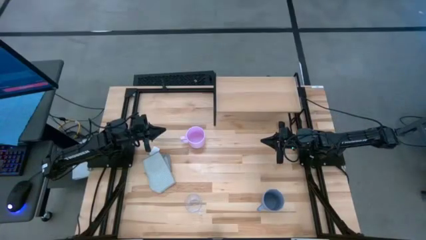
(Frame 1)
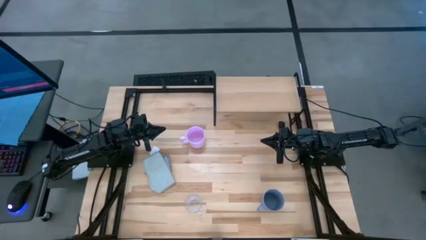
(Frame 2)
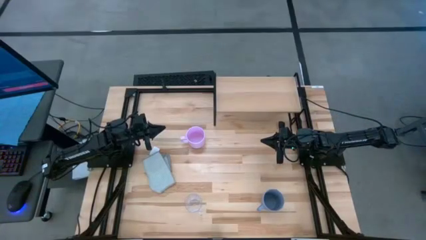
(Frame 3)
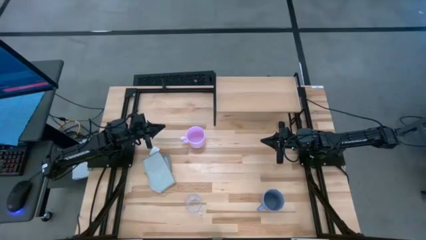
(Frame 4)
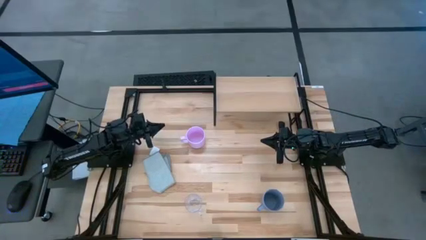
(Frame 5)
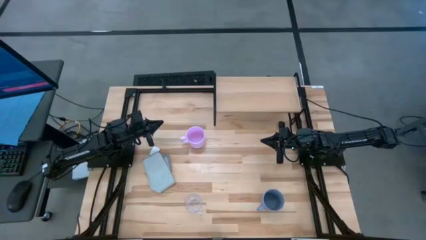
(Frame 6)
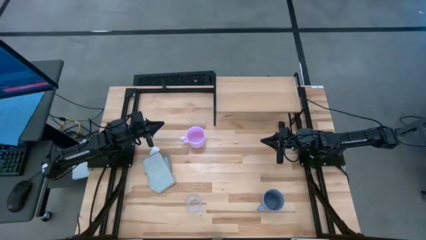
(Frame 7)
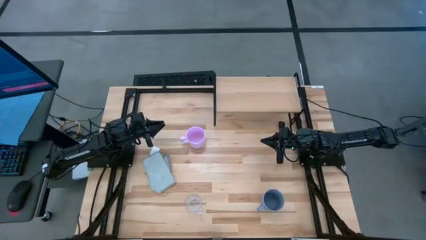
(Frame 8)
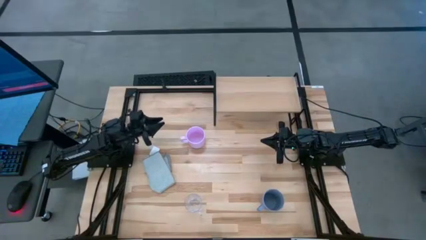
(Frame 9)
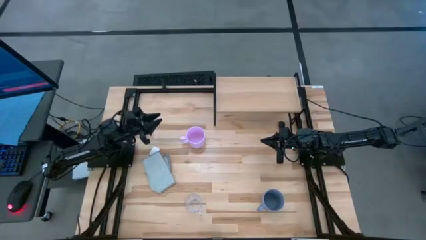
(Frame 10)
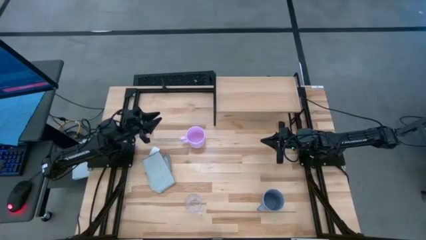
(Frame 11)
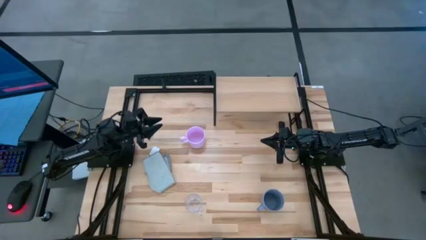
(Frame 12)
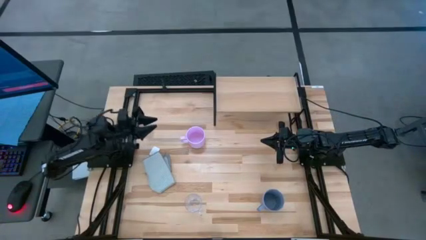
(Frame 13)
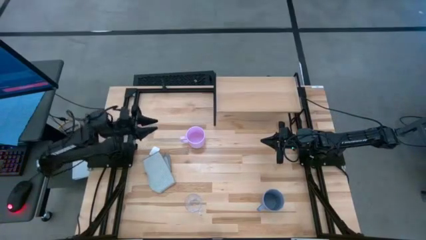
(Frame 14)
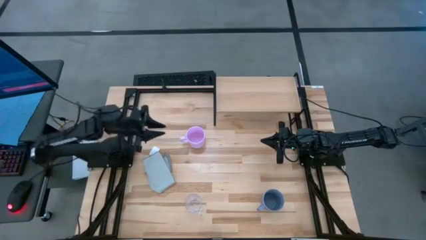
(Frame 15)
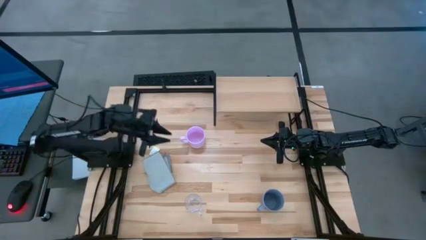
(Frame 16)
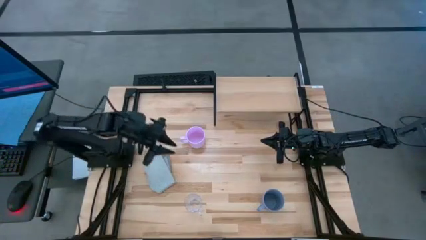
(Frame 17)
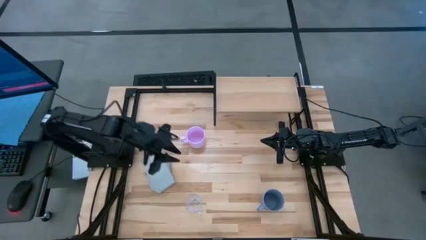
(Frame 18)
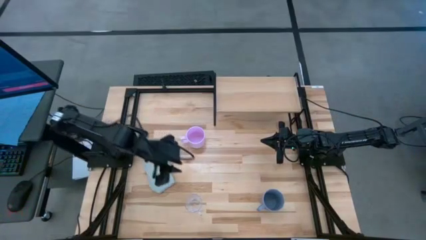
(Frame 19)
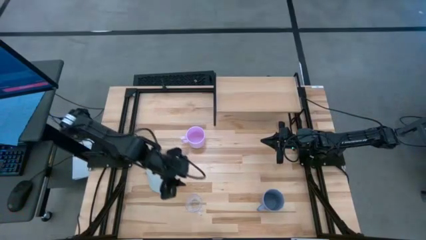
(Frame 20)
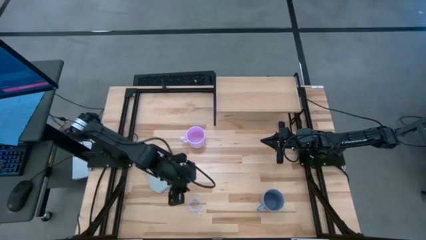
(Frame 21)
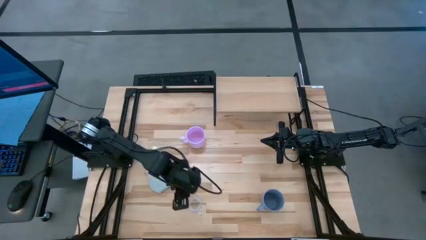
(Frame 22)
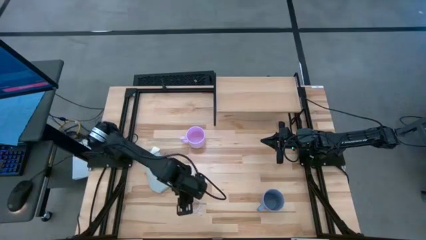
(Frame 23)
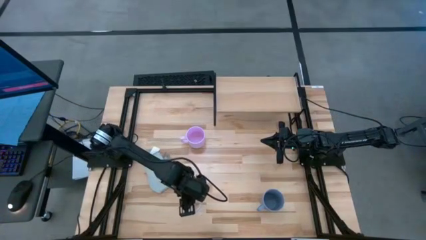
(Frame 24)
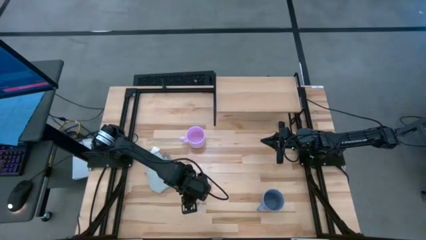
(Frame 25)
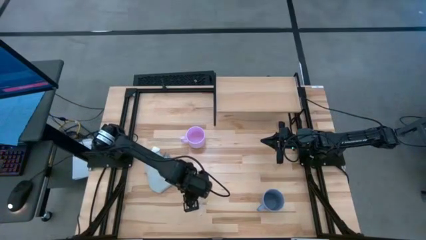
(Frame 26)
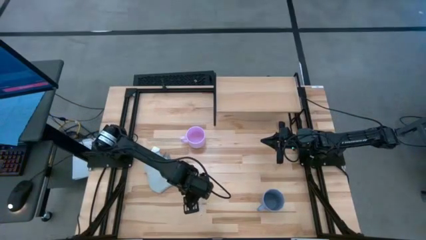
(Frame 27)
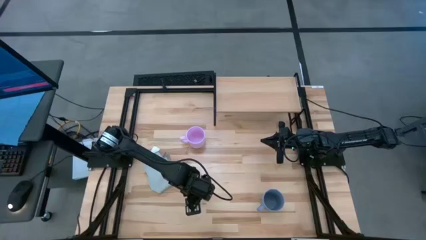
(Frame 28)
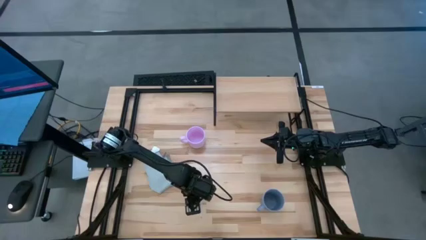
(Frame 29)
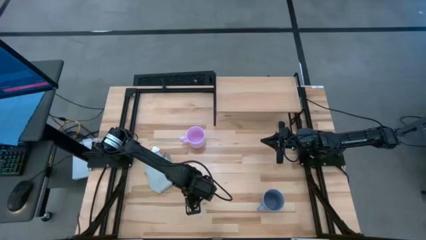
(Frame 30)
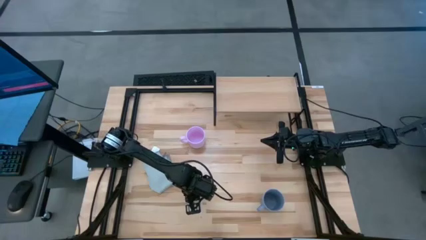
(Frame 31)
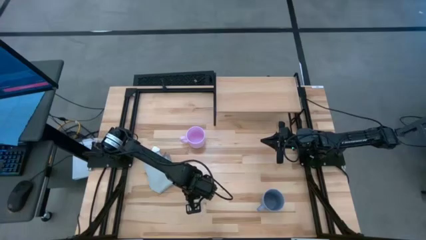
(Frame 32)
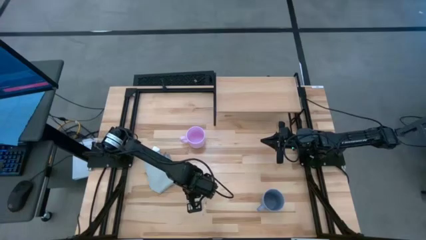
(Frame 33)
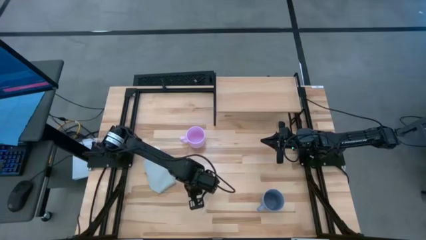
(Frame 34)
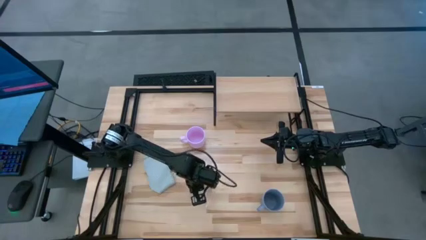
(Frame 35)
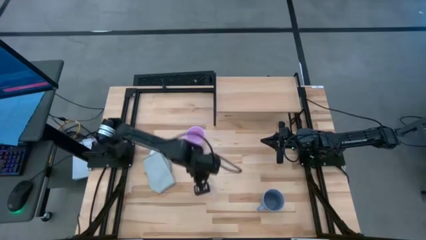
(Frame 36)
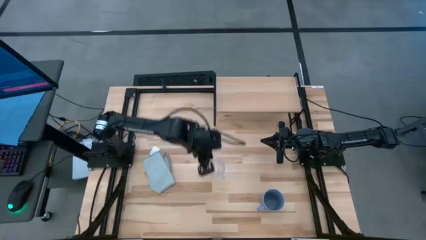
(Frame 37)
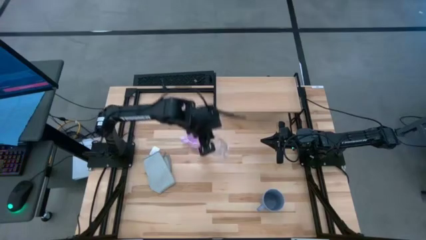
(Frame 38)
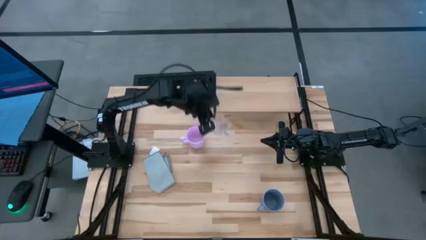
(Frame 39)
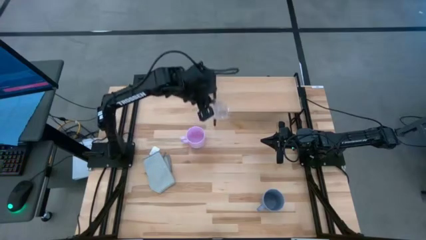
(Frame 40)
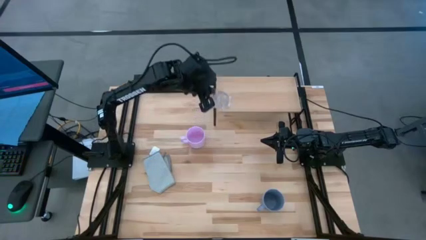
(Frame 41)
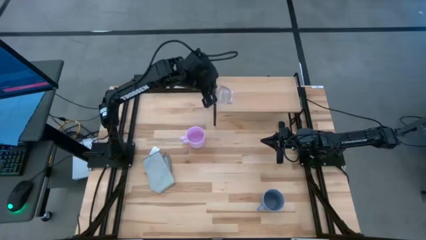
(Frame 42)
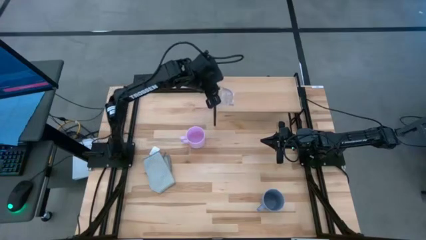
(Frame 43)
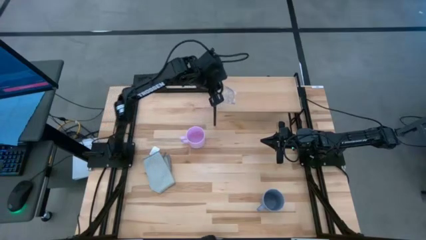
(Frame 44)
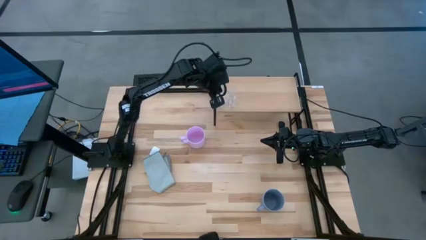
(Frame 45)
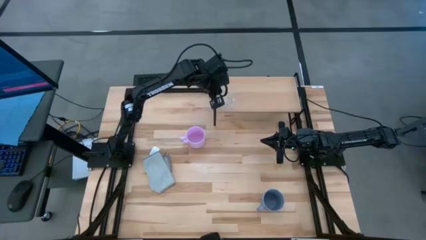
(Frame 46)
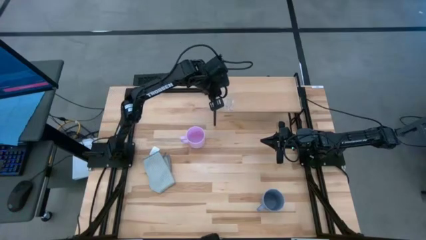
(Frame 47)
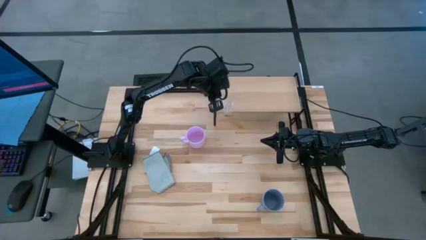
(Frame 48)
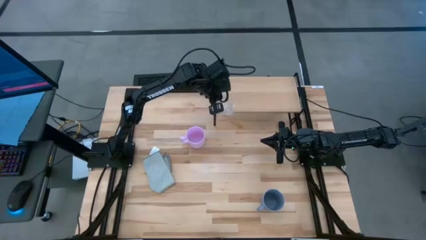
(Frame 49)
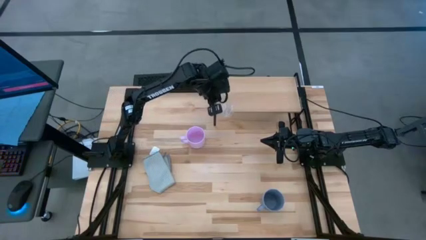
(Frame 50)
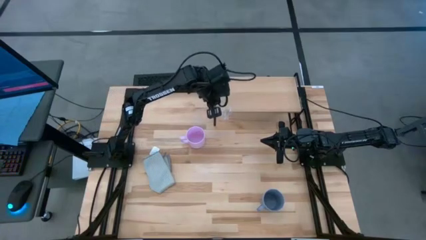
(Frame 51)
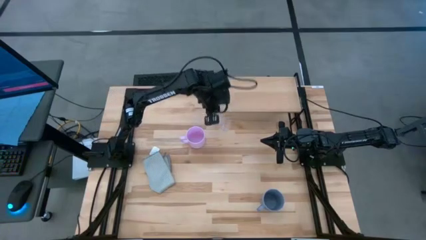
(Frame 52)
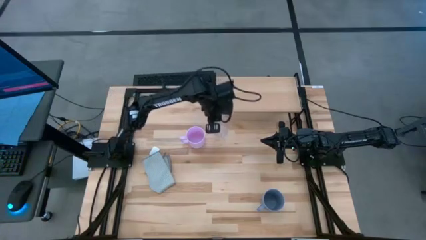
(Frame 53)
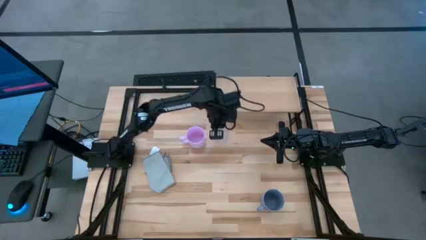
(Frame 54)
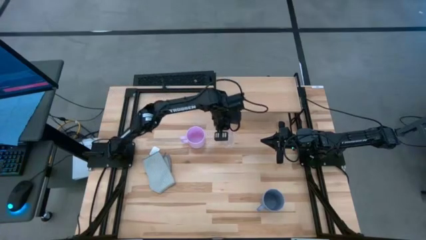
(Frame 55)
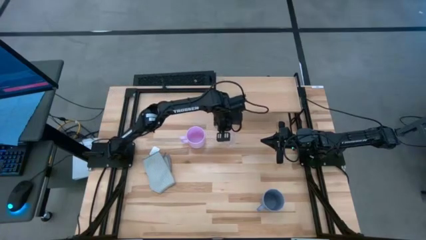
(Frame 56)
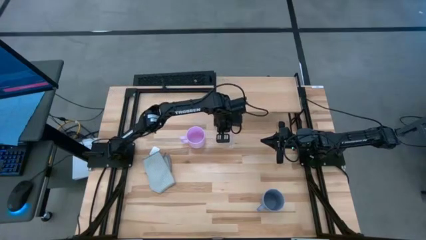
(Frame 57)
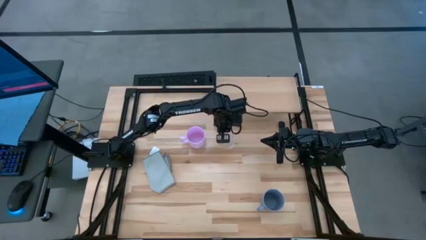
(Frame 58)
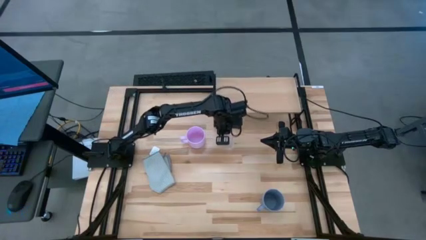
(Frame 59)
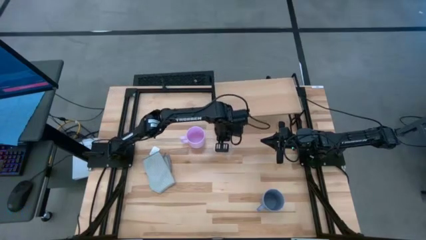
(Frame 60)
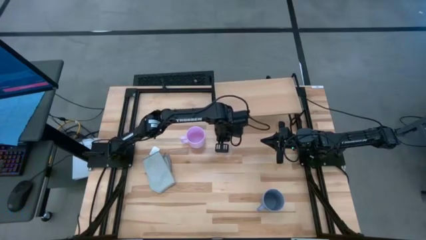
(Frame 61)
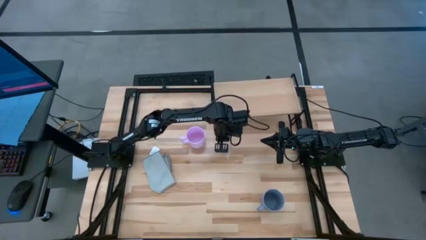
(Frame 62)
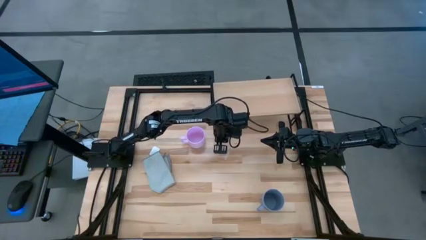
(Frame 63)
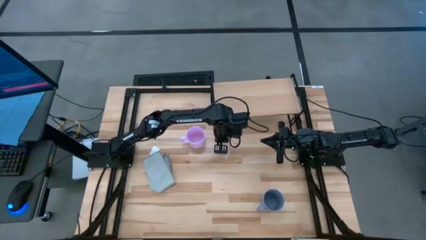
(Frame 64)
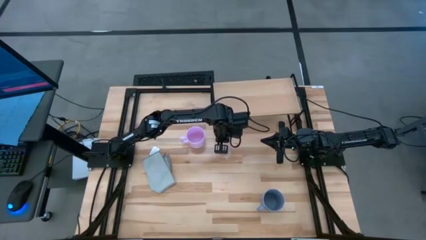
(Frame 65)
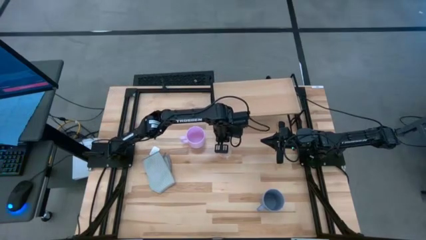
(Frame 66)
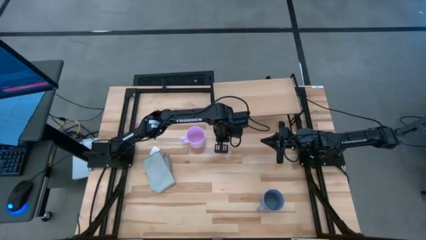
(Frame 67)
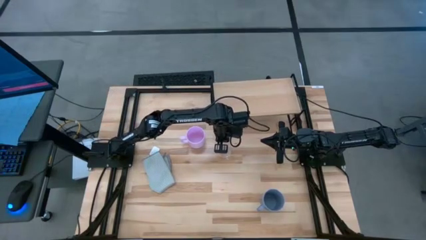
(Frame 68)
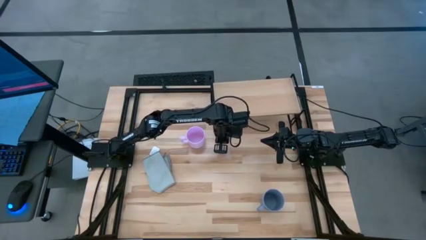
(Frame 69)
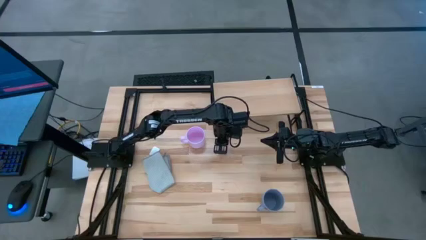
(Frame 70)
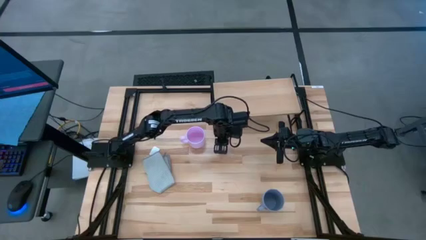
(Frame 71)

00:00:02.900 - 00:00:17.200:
Task: Stack small to large cups/mugs on shelf
Put the transparent mug on the shelf
